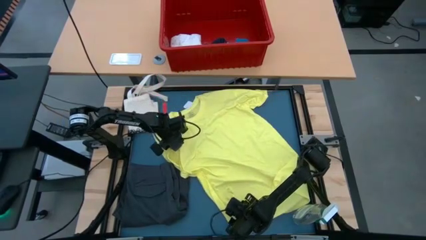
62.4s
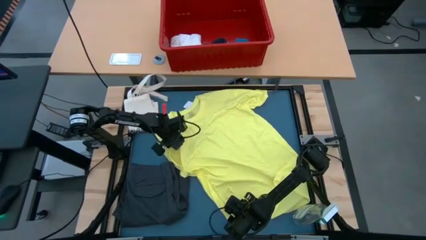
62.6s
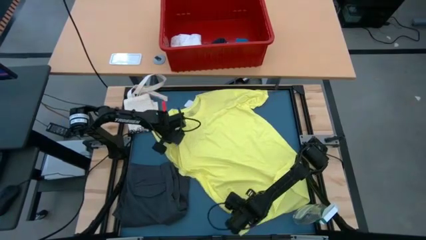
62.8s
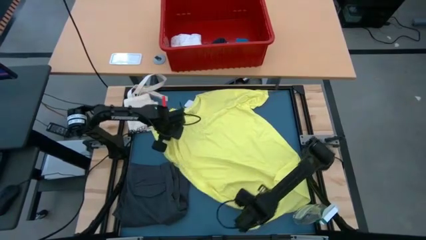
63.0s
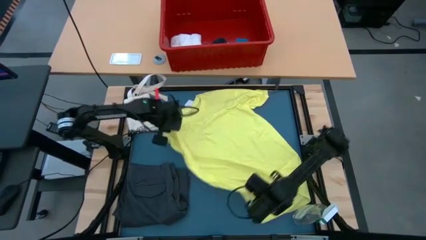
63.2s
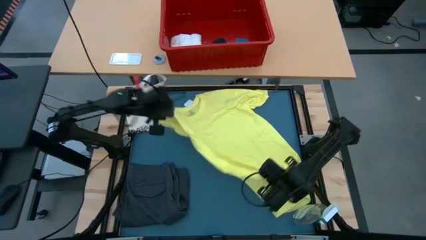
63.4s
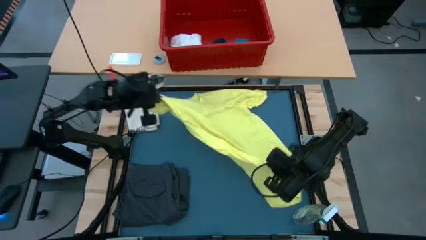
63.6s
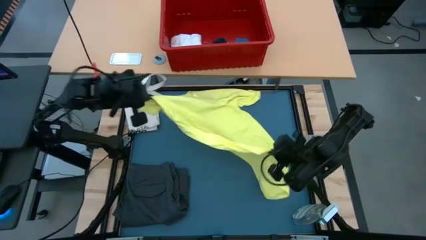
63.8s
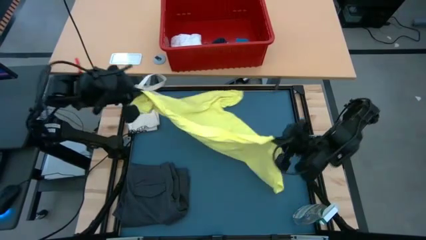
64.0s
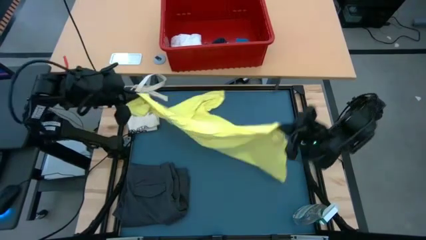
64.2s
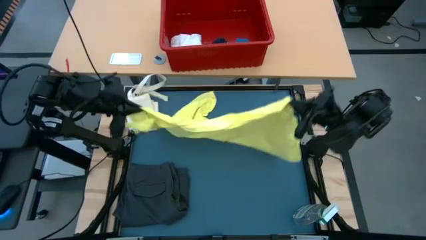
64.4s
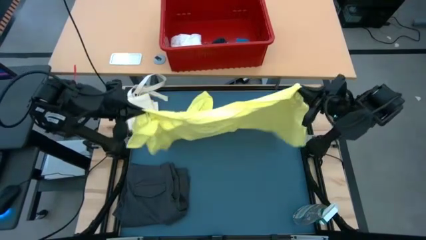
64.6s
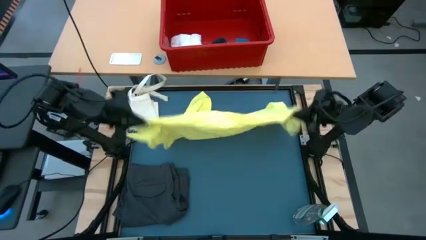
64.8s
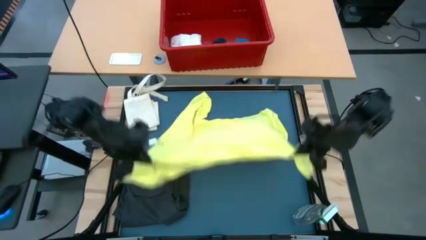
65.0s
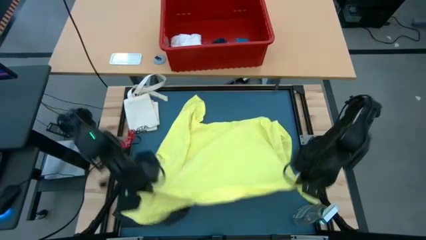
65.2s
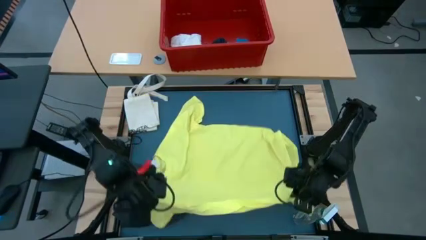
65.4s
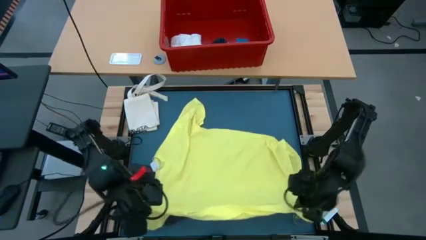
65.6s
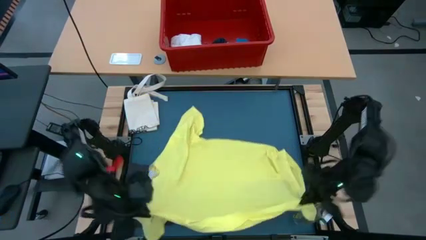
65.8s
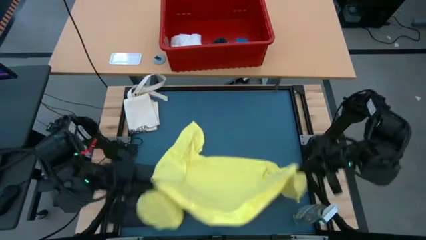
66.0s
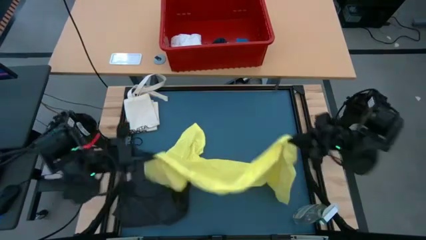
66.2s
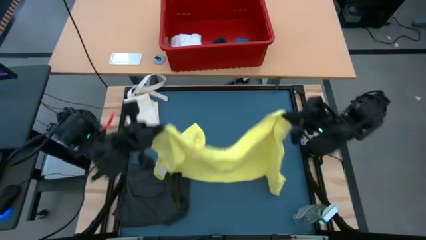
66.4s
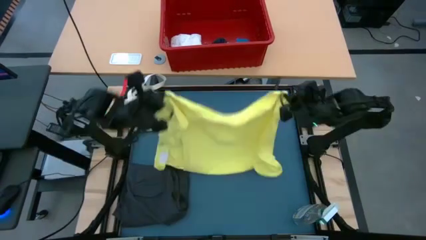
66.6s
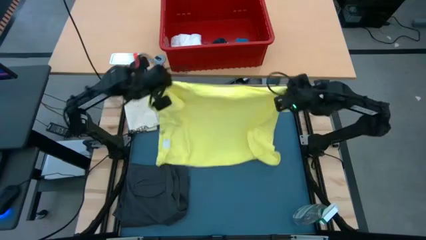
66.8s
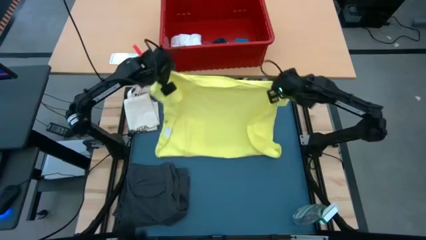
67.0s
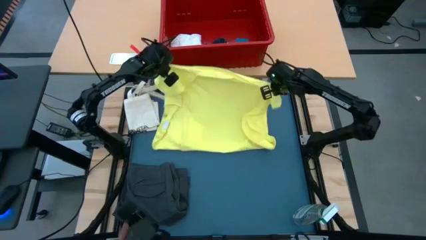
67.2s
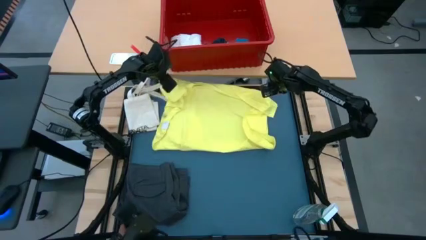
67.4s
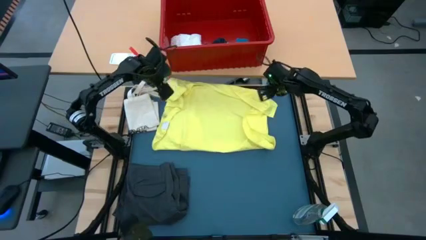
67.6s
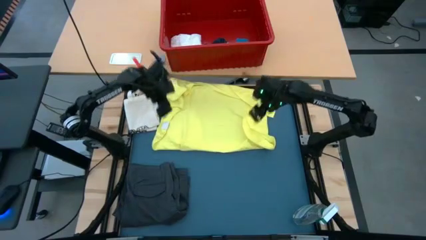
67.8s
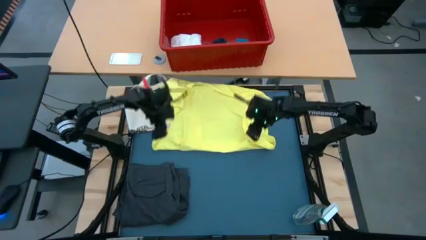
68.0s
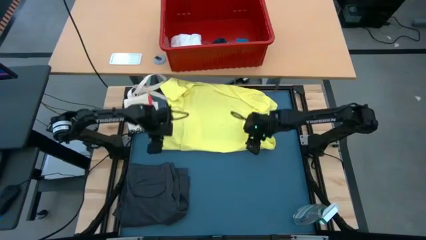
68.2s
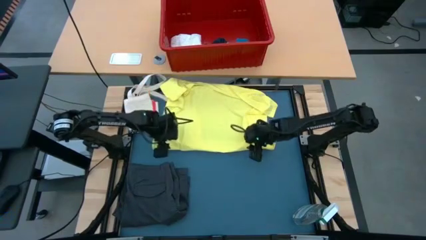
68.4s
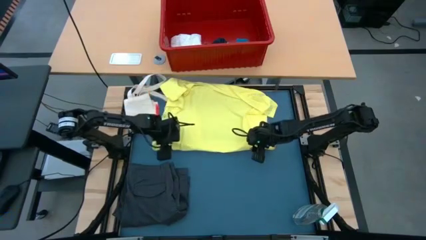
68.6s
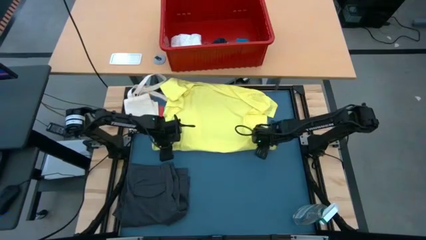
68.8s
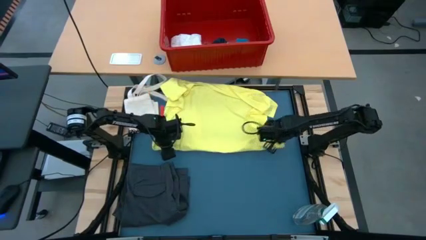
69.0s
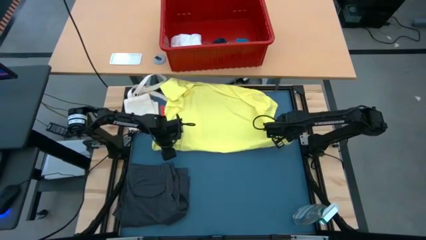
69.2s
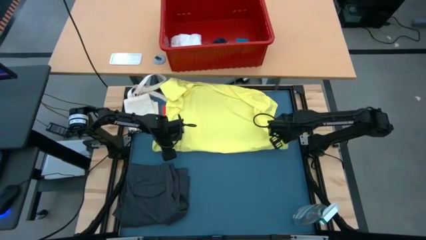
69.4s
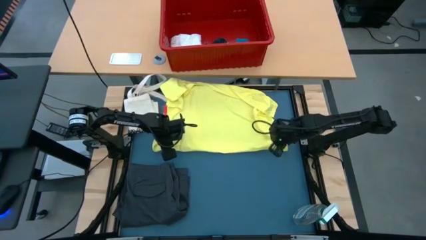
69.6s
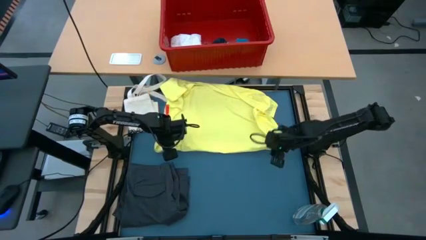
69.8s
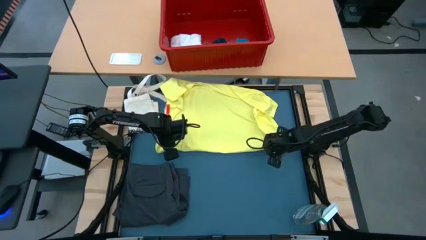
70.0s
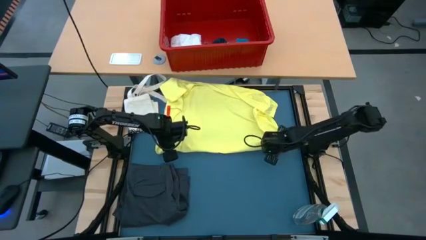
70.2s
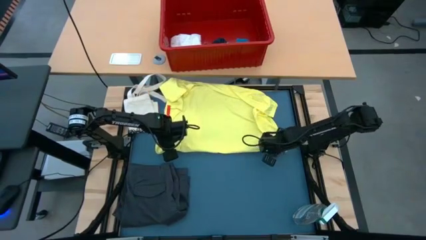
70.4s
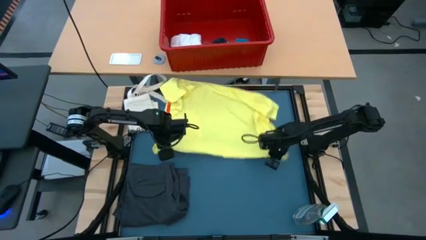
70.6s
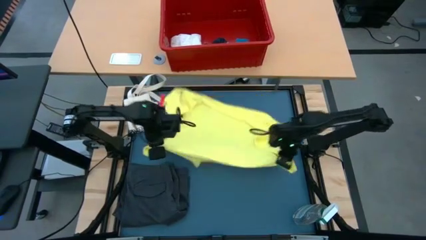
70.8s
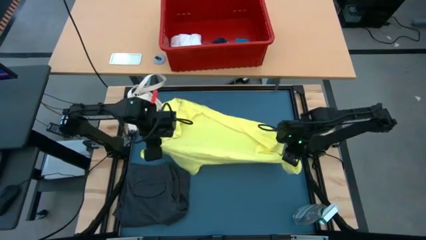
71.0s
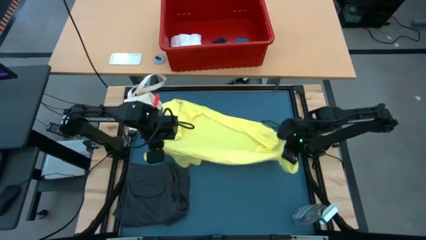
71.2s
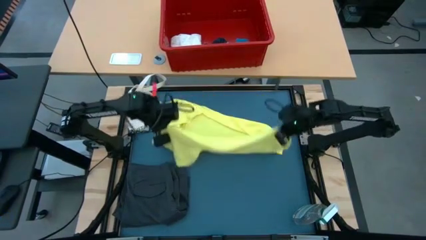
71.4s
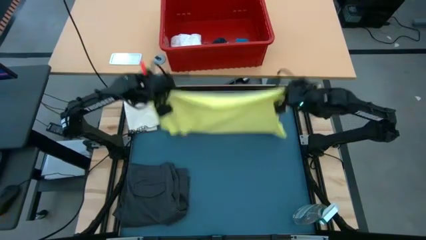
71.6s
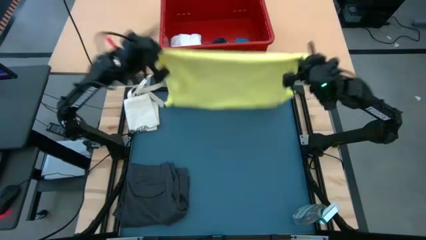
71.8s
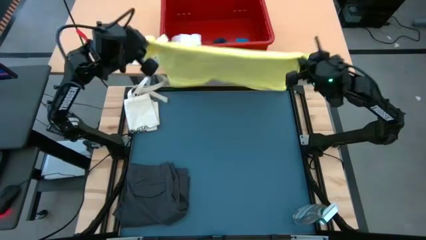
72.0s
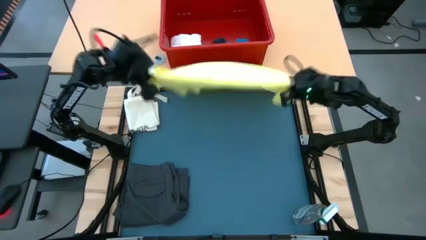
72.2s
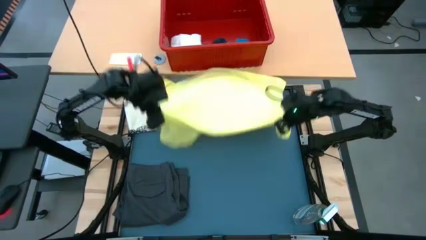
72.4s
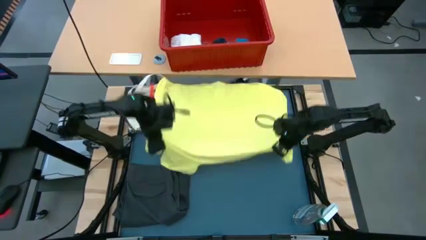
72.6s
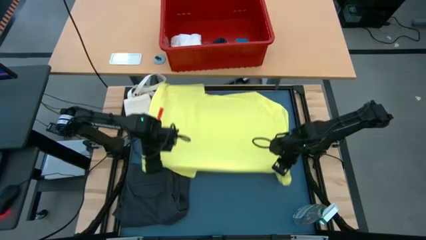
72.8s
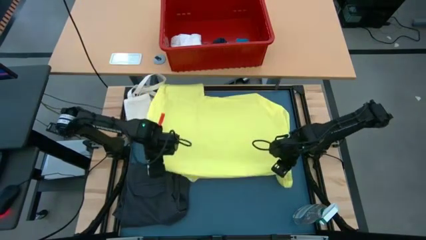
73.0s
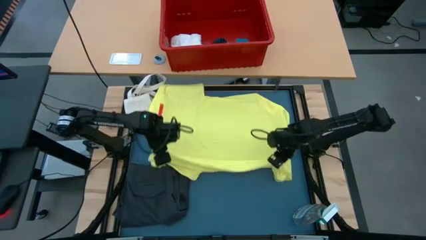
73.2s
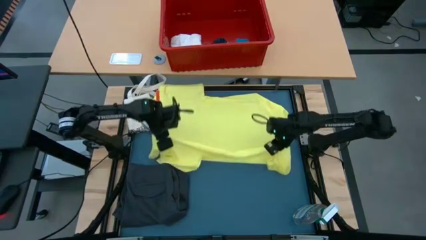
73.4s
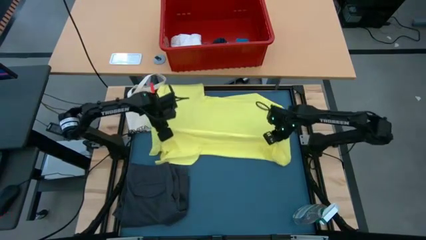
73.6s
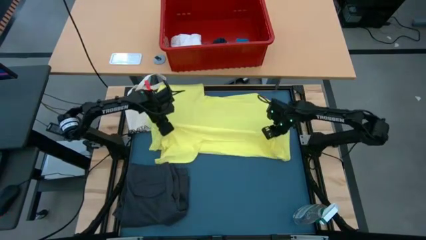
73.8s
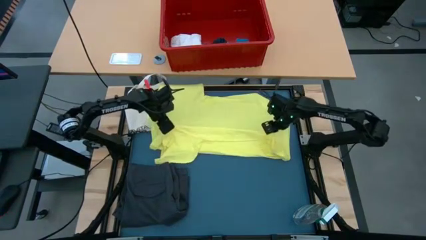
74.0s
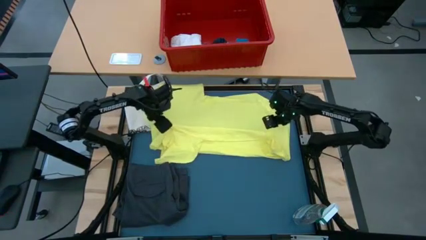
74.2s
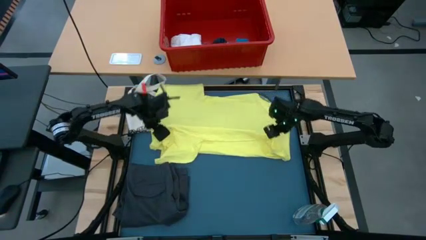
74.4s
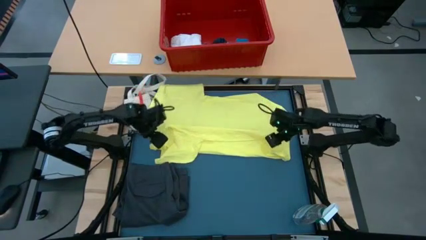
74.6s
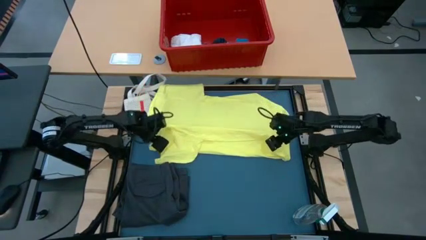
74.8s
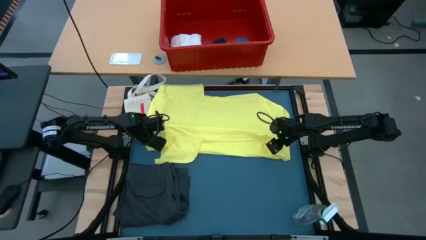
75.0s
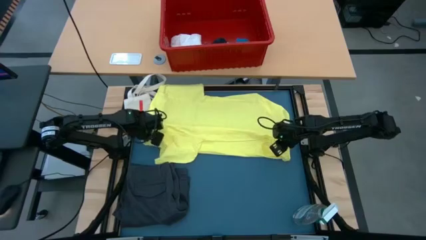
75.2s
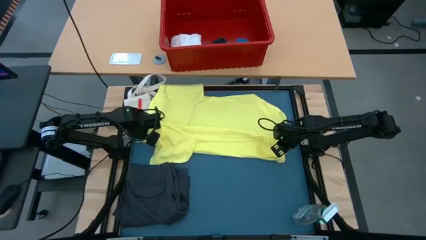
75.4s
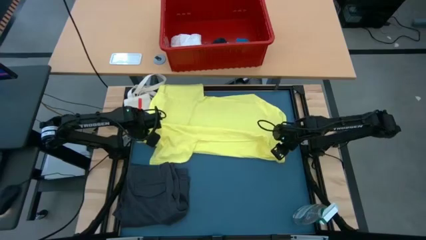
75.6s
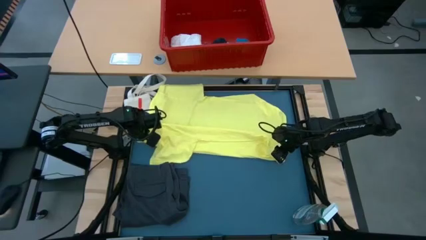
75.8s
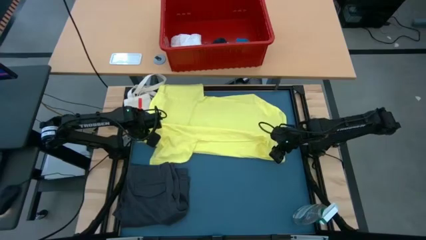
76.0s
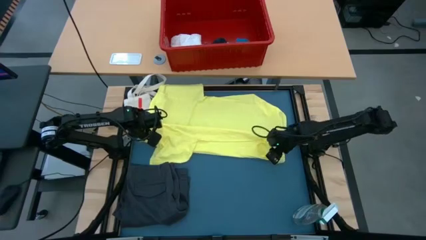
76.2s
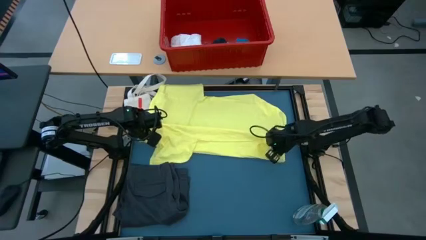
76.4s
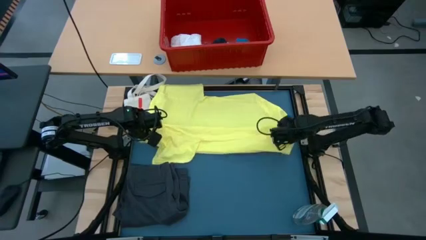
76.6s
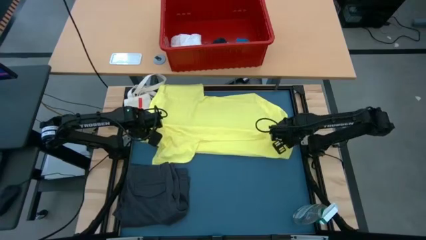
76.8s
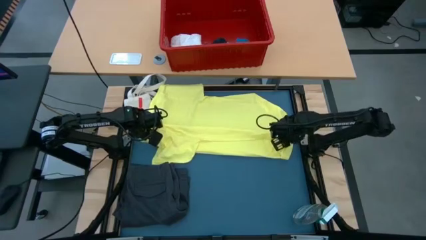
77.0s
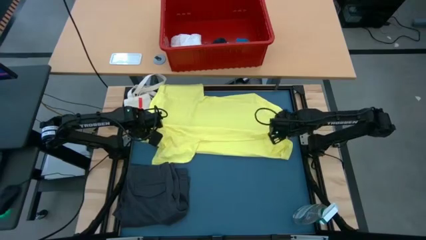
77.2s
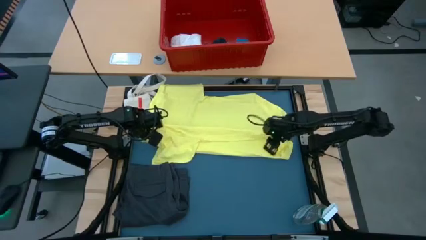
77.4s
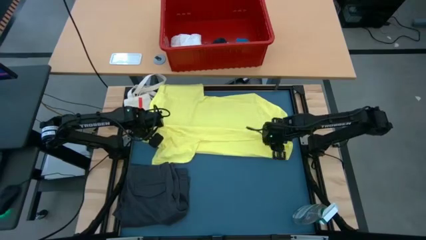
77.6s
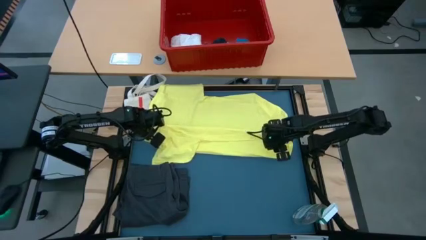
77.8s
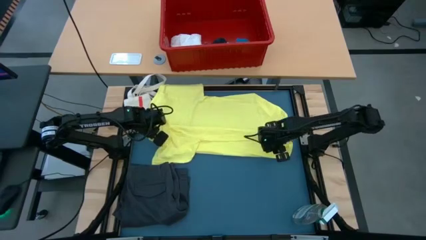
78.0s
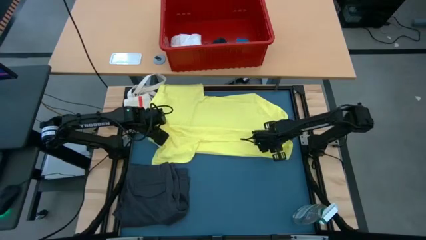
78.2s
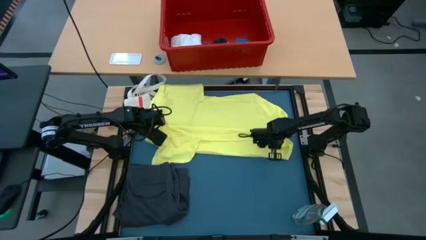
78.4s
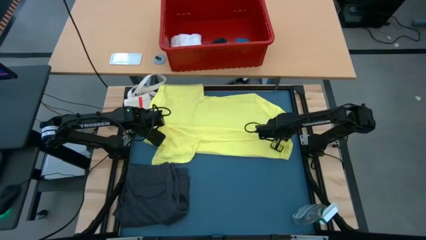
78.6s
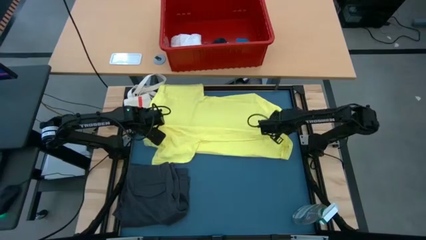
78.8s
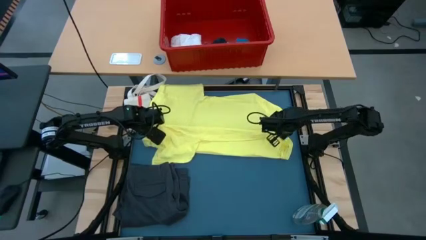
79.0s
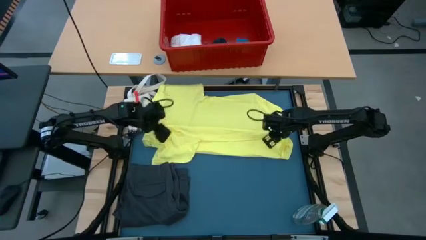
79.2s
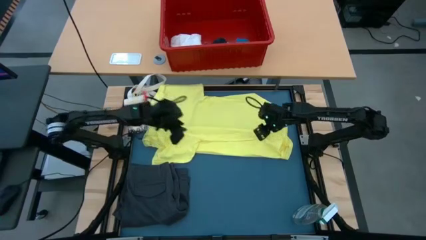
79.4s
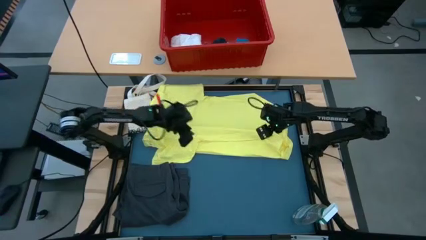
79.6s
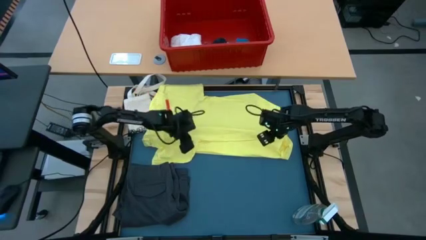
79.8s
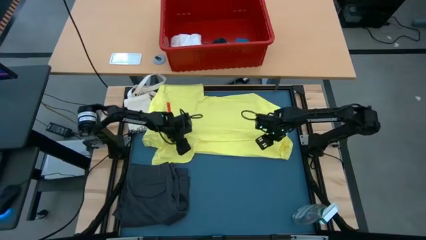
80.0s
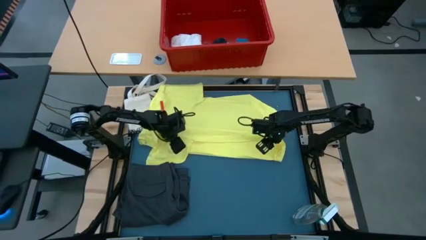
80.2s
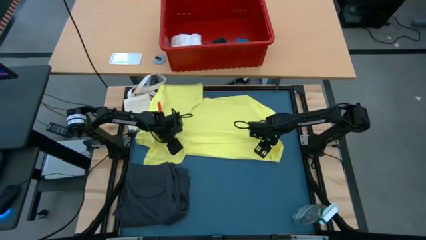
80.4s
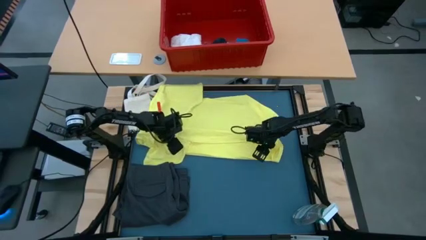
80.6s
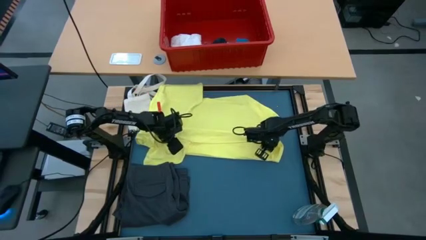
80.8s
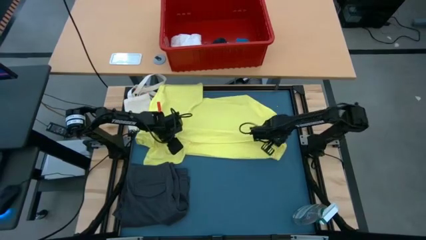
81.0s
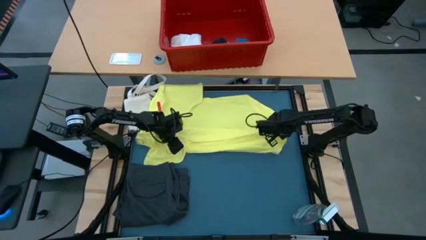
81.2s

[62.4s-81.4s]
Task: Fold laundry
Fold the yellow shirt
